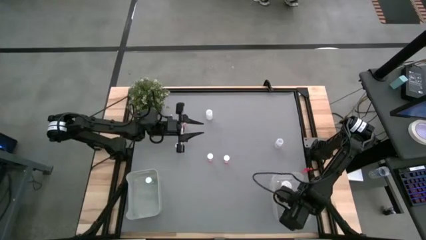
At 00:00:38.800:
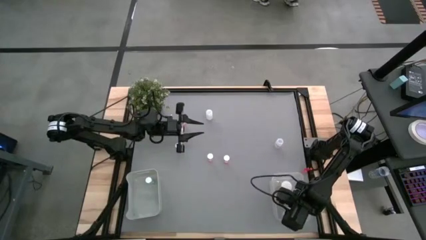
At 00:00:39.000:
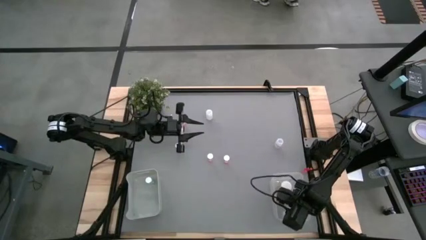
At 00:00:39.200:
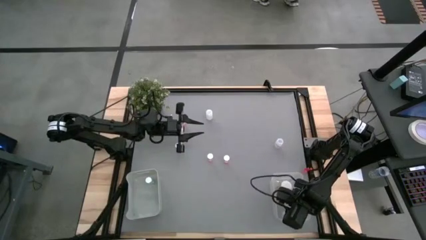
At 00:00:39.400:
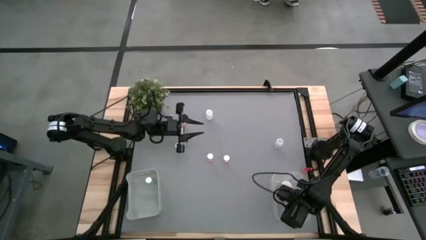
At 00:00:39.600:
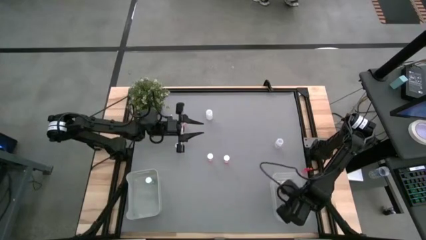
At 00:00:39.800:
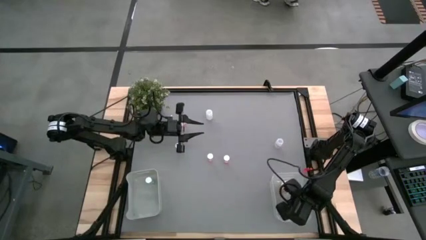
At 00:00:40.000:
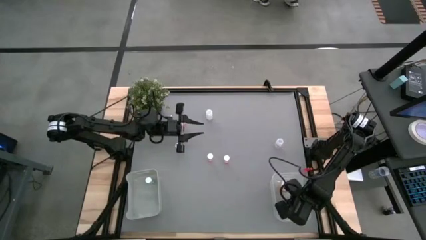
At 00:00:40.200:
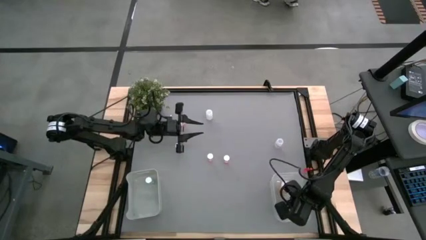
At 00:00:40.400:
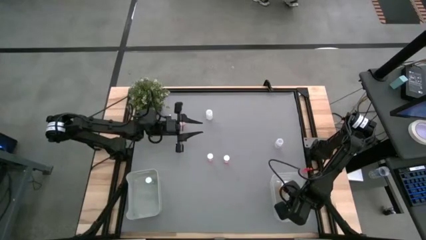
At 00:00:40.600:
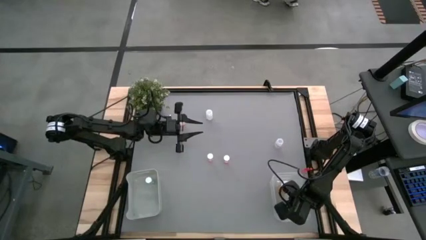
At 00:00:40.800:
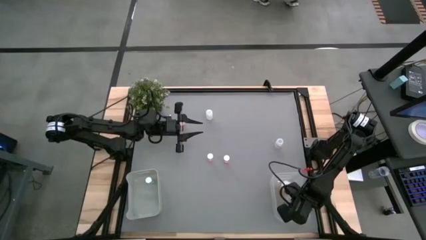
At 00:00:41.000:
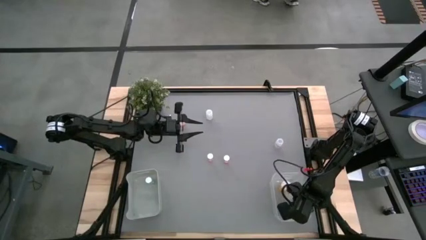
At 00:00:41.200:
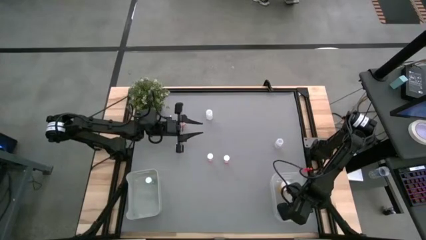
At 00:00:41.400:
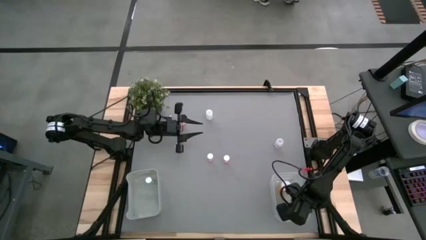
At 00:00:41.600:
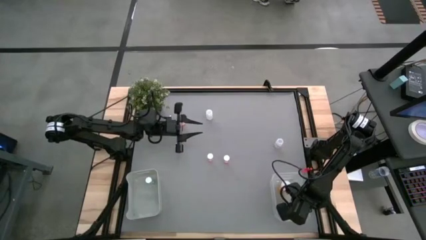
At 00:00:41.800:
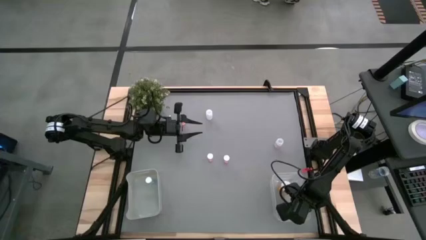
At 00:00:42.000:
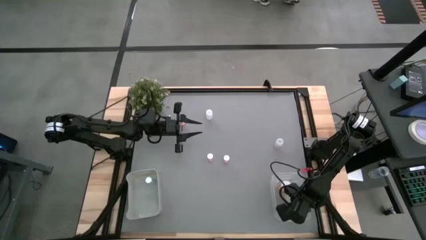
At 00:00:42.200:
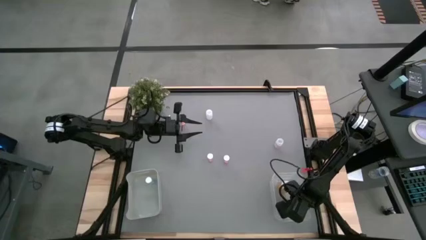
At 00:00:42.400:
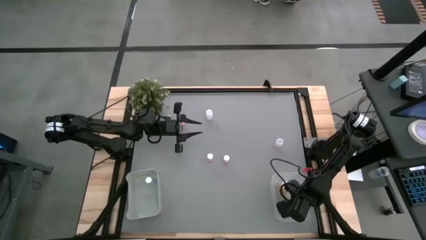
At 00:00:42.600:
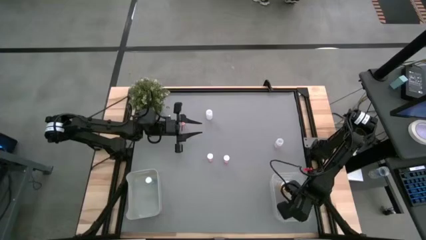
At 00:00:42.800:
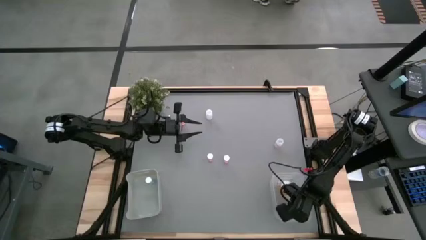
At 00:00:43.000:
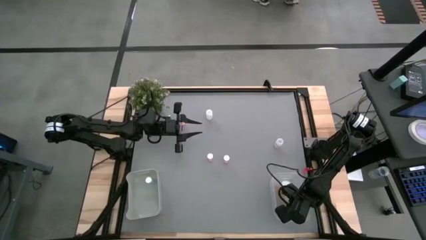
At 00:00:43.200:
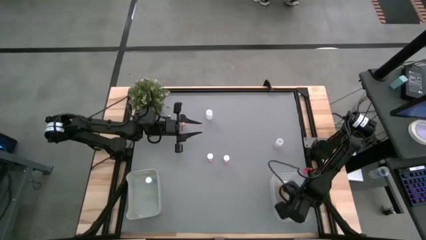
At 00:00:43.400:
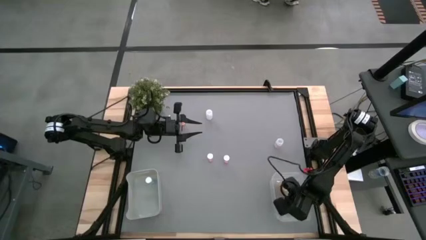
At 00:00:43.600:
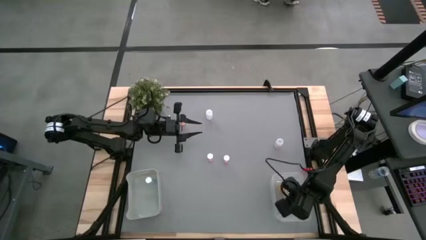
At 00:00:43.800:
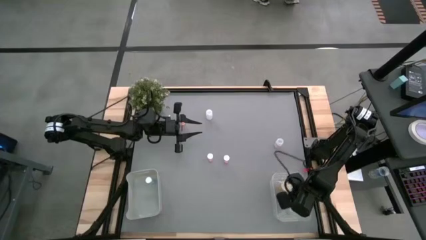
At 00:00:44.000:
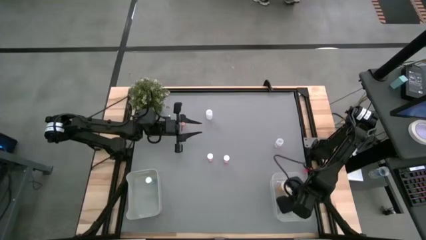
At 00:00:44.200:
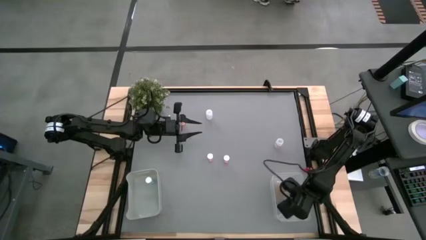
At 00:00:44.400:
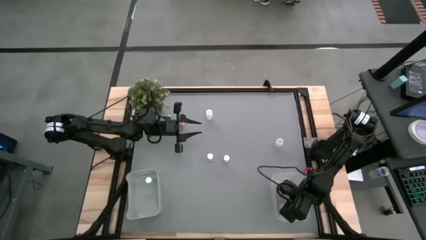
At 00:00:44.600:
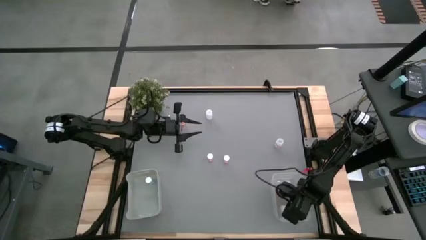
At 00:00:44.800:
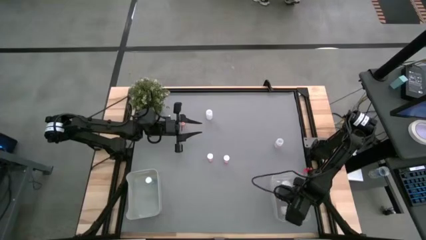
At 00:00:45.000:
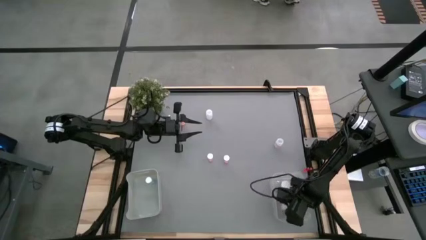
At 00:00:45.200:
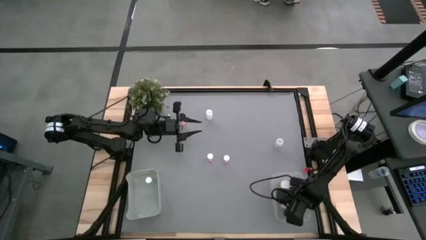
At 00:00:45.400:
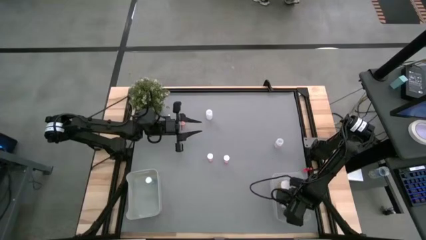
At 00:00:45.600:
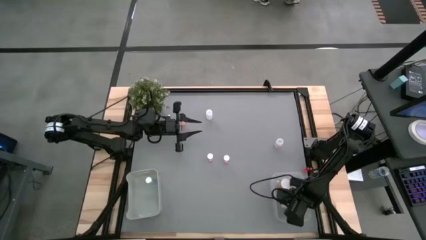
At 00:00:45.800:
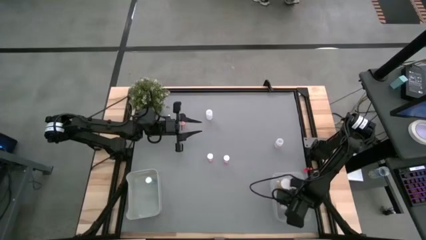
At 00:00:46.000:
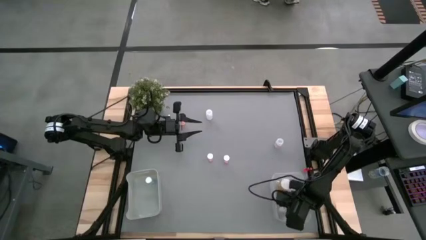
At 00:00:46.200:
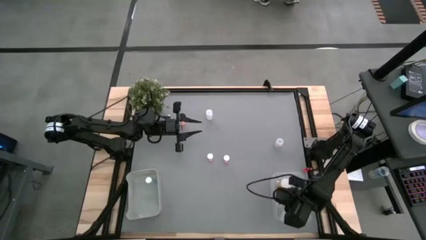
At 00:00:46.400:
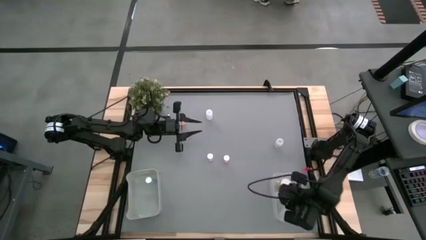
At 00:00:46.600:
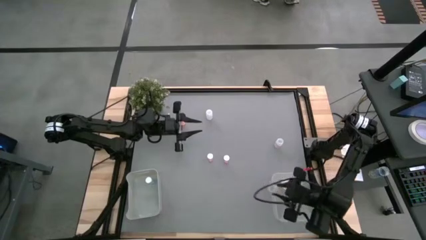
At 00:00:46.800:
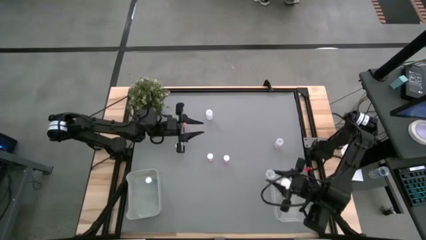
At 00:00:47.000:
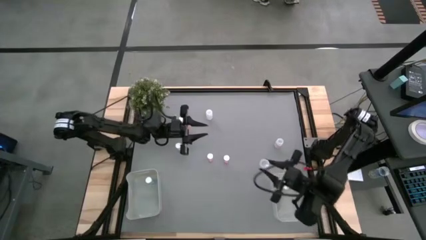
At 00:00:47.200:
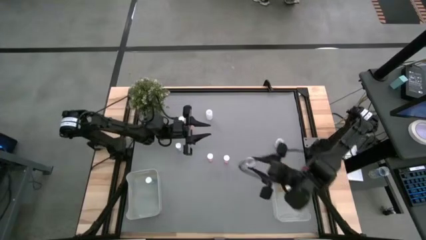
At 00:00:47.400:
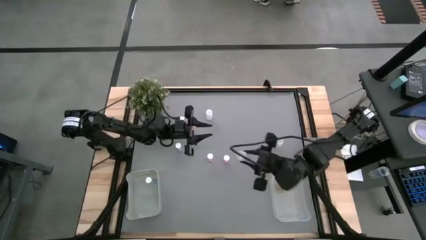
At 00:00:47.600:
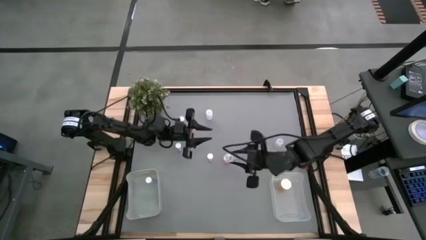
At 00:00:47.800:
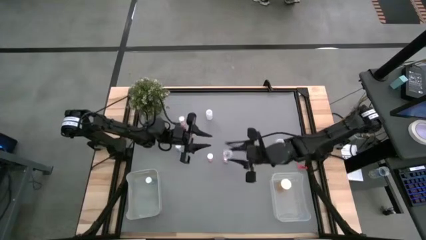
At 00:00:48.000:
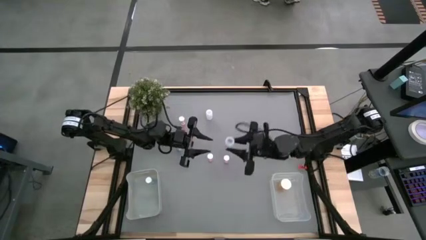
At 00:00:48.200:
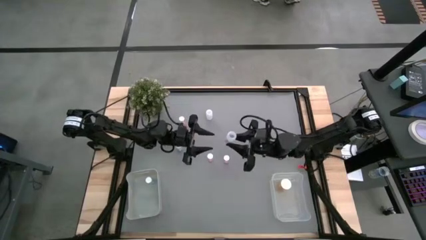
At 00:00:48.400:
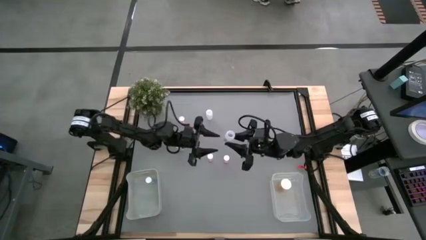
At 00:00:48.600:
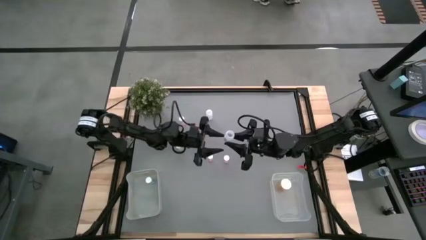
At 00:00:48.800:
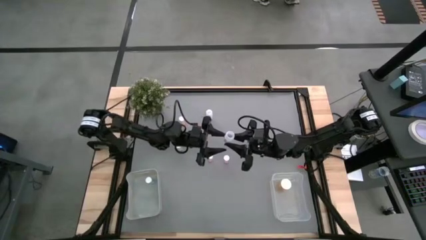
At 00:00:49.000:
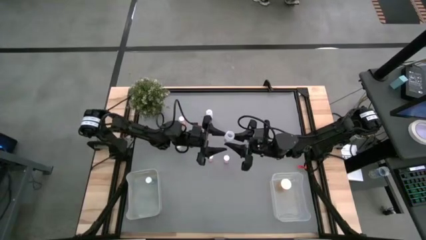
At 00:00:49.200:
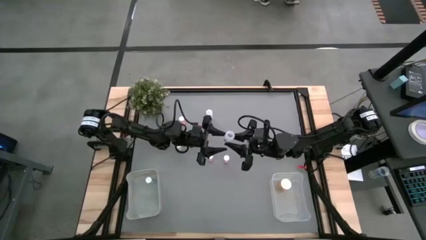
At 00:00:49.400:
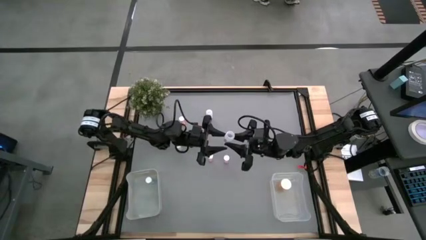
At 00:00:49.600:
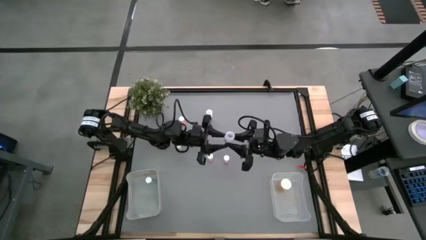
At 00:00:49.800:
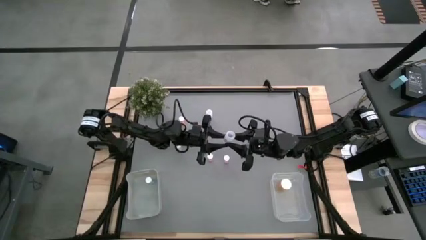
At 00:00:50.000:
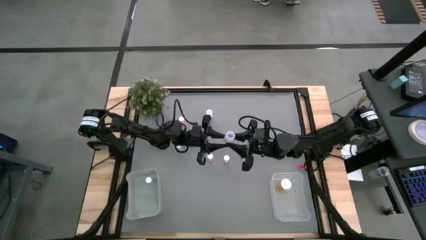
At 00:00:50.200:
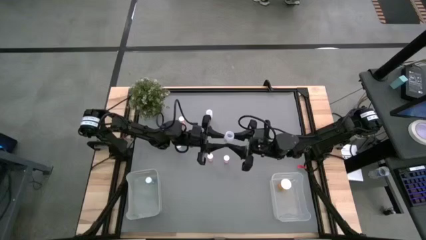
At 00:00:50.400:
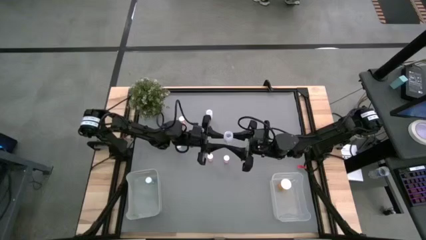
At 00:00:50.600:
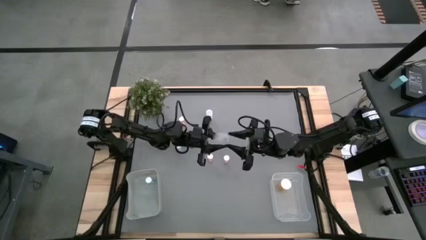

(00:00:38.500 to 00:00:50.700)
Task: Pick and place medicine bottles into bin by pill shape (circle, oval)
Put the left transparent capsule bottle into the transparent bin

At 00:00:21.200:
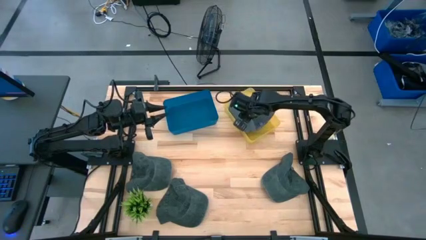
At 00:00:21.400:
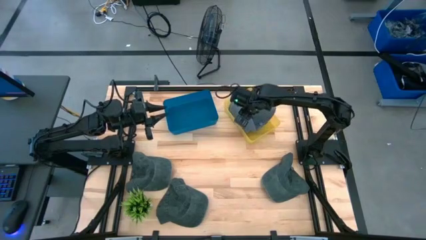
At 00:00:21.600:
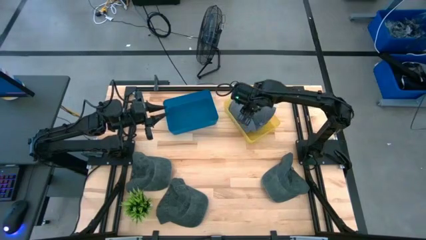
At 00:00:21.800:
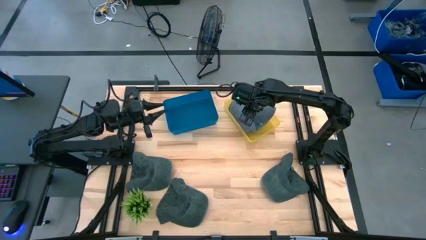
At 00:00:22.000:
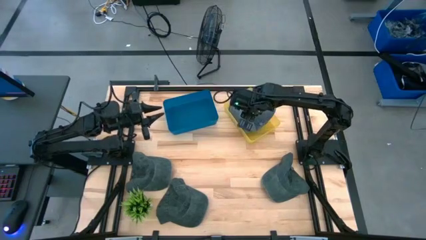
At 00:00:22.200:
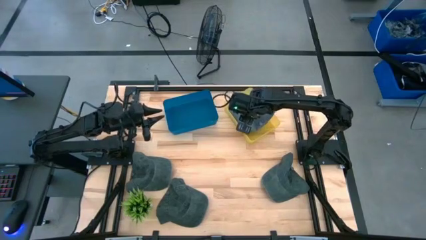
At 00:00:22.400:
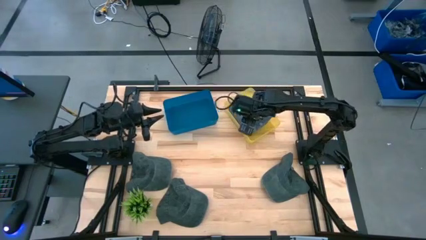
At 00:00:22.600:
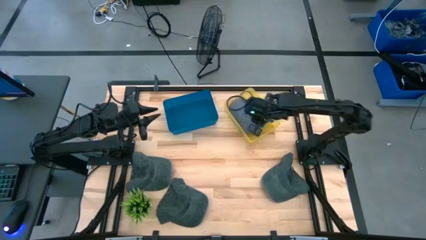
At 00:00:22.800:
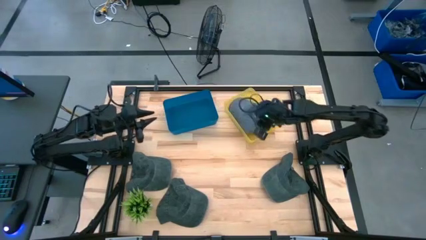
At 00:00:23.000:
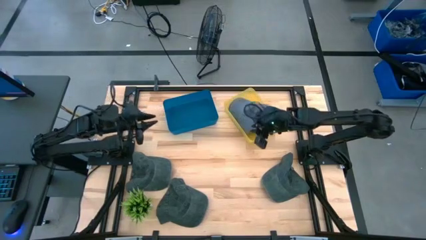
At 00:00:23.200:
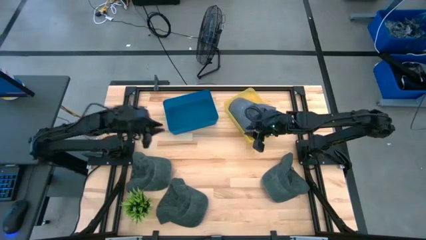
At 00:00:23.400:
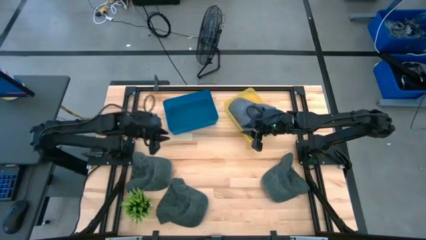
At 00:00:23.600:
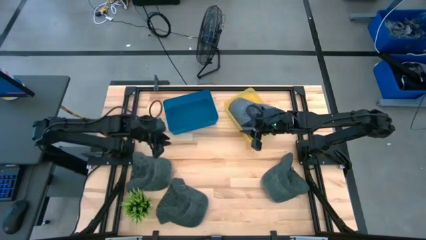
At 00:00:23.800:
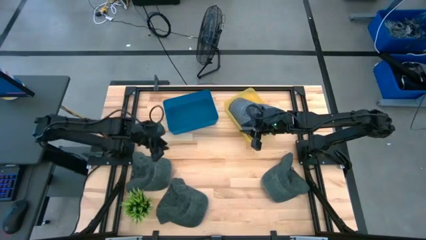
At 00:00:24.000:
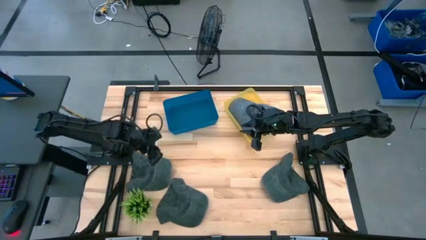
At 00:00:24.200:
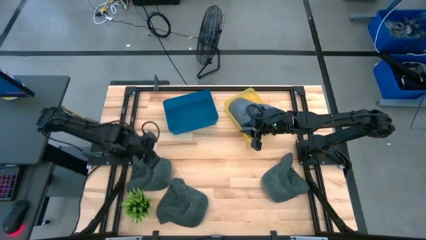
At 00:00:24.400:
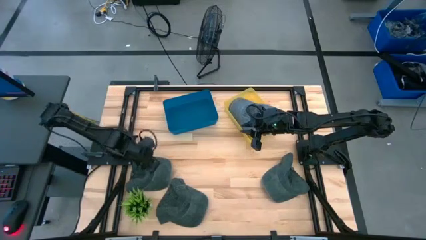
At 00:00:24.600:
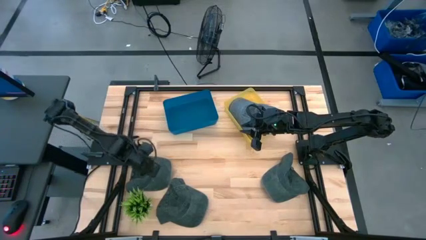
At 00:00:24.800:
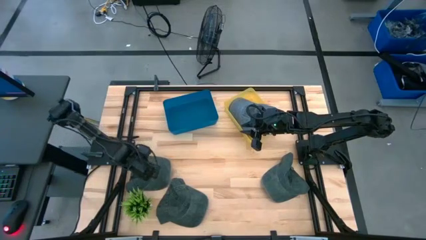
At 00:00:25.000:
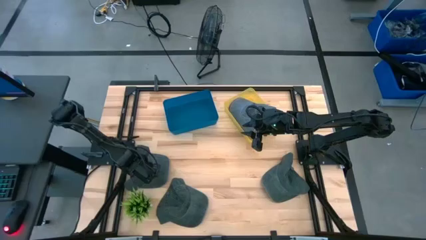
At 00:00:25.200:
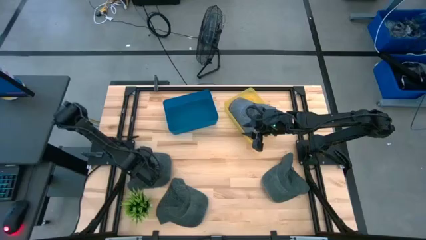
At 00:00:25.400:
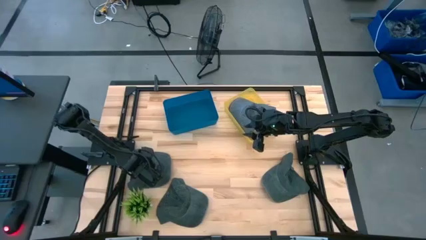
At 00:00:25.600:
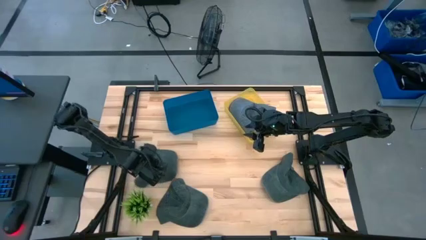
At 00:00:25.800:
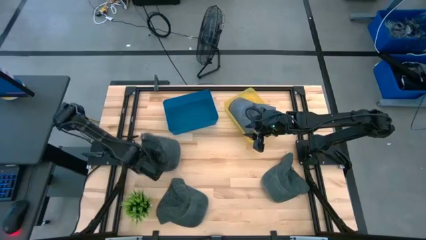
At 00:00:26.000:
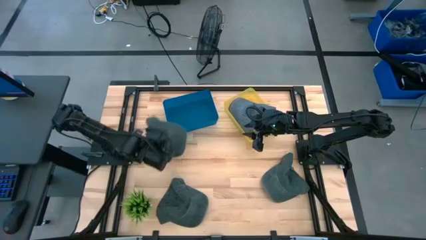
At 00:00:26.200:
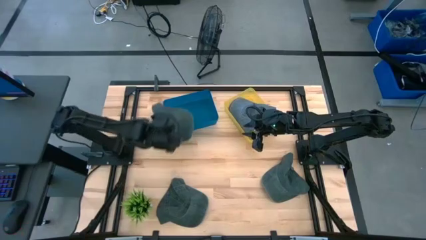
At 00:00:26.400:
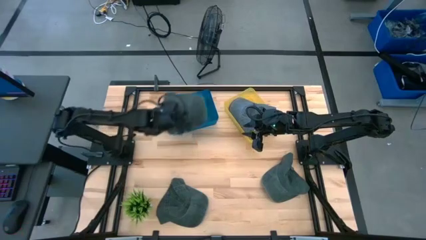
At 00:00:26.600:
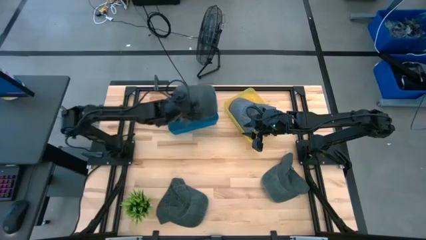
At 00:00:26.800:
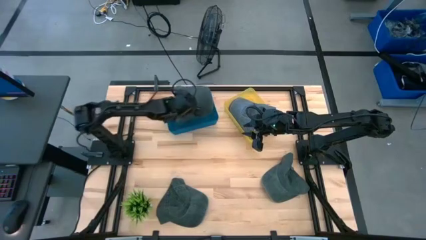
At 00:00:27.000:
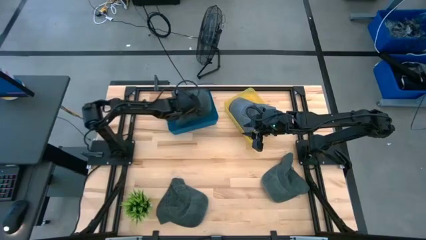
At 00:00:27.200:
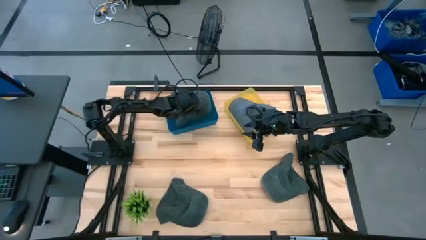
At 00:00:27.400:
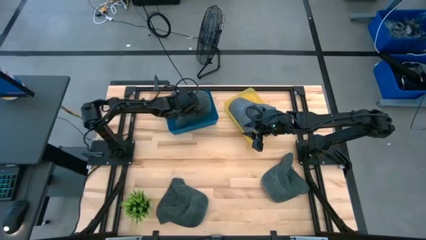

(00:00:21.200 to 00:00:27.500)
Task: Pick & Place hat
Put the top left green cap into the blue bin
